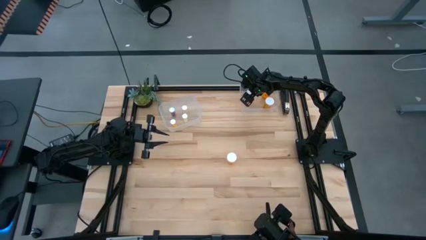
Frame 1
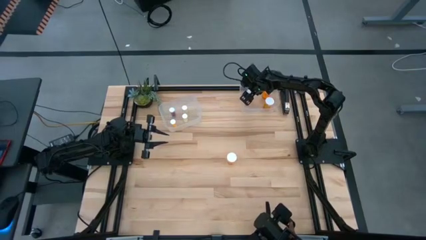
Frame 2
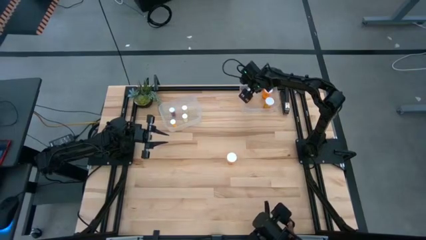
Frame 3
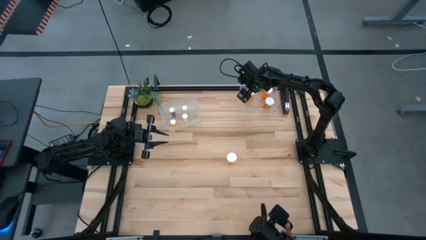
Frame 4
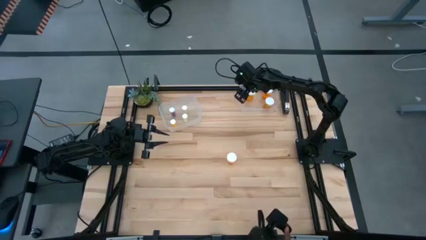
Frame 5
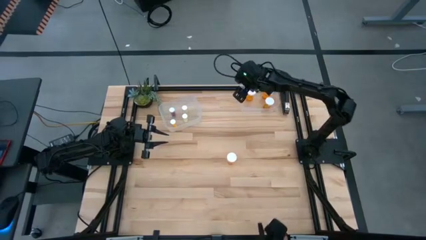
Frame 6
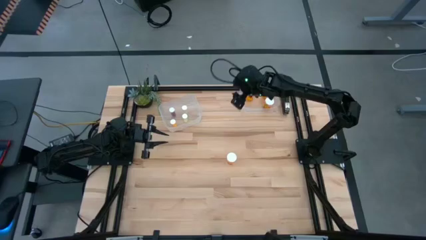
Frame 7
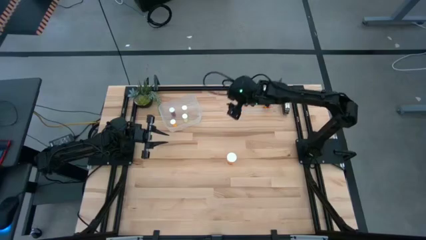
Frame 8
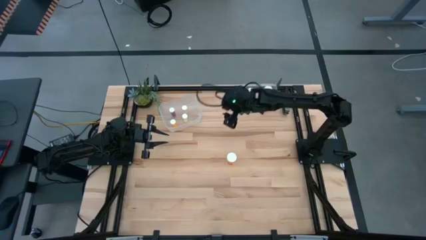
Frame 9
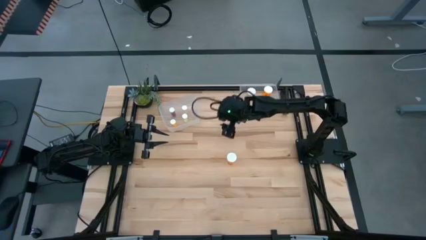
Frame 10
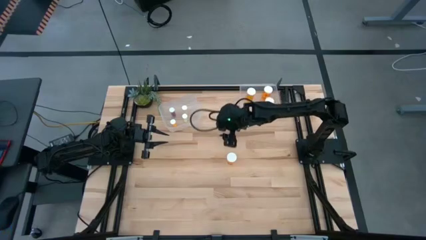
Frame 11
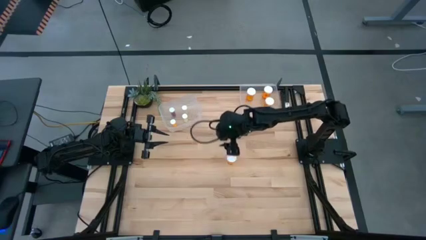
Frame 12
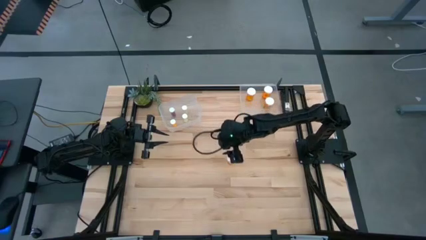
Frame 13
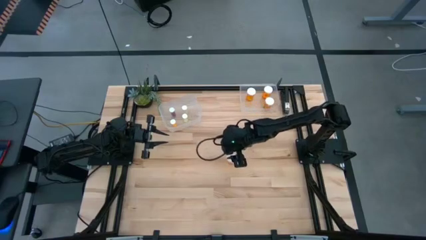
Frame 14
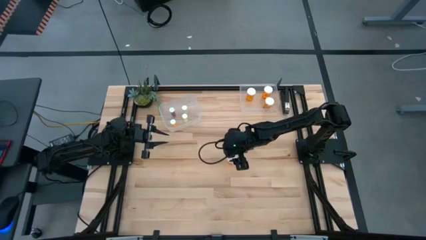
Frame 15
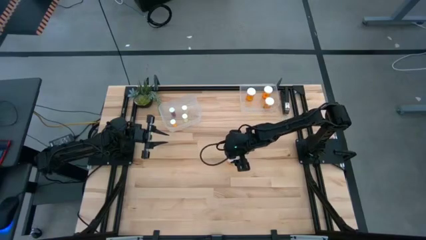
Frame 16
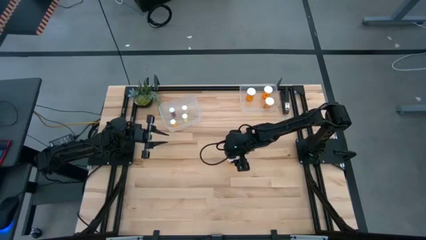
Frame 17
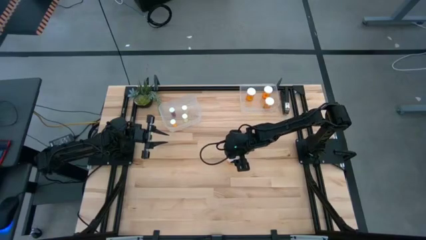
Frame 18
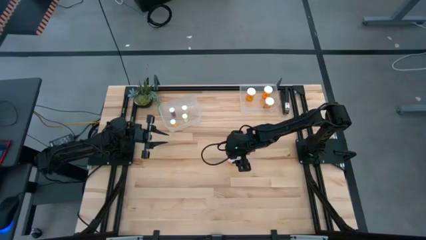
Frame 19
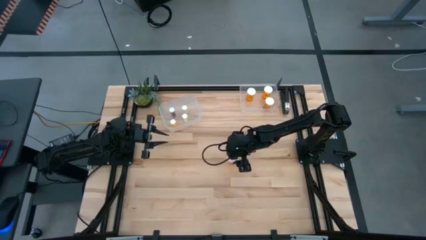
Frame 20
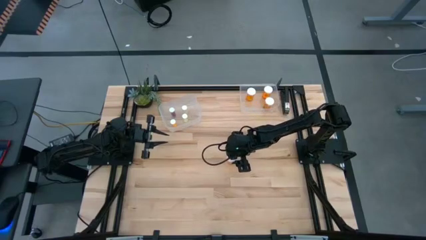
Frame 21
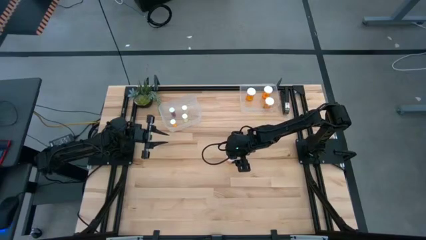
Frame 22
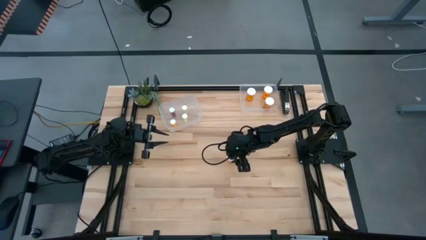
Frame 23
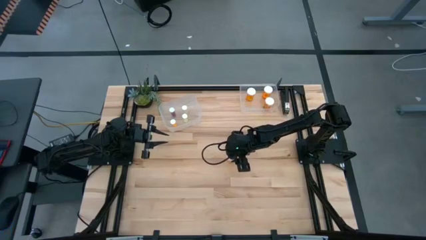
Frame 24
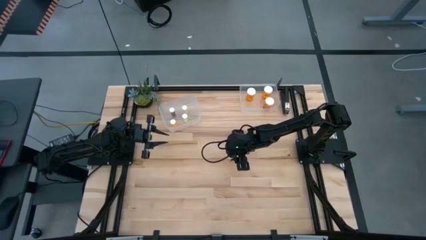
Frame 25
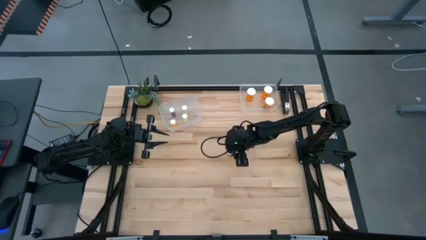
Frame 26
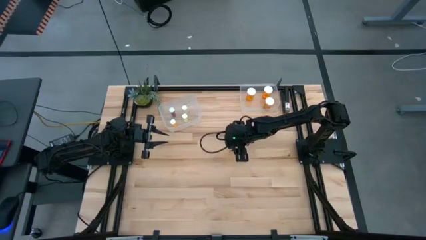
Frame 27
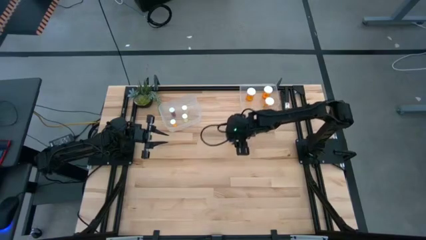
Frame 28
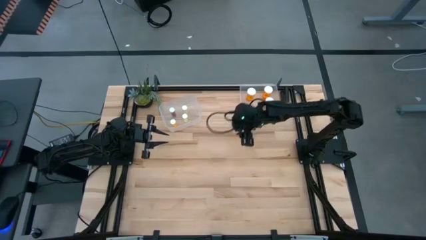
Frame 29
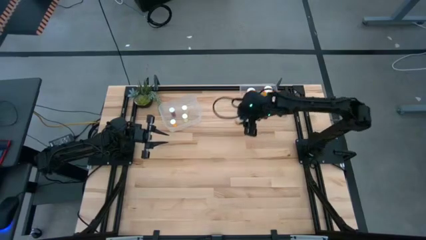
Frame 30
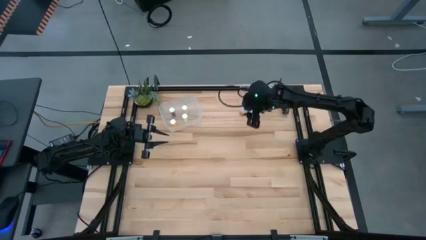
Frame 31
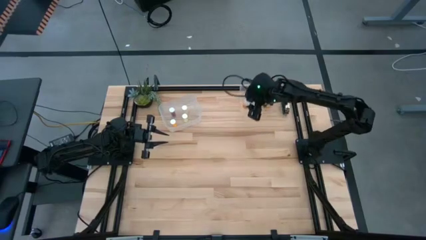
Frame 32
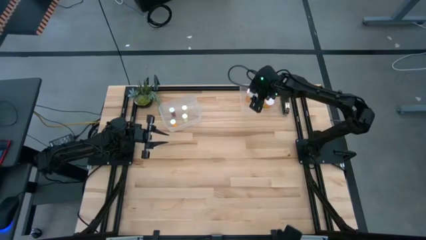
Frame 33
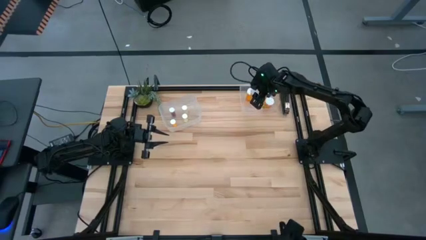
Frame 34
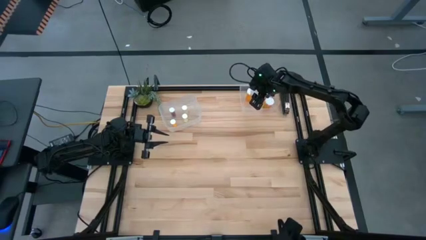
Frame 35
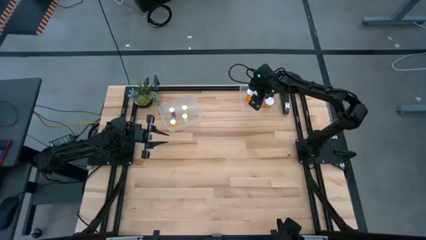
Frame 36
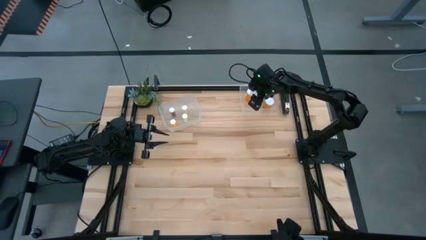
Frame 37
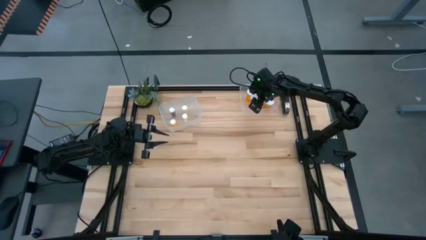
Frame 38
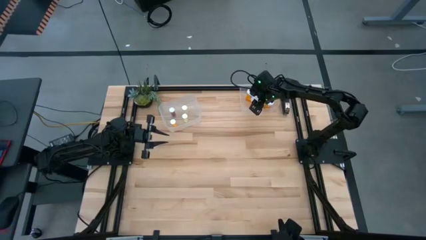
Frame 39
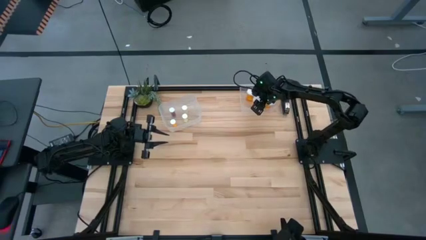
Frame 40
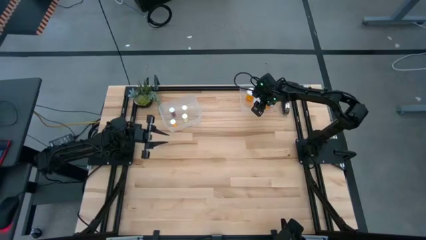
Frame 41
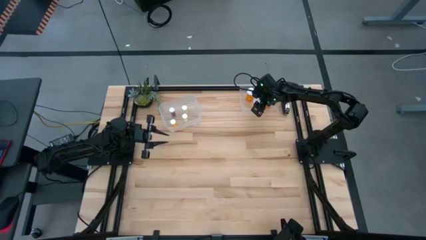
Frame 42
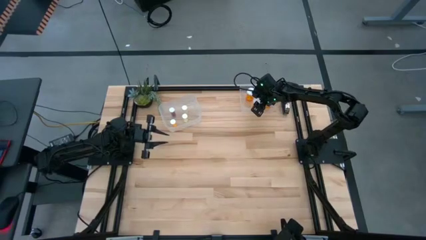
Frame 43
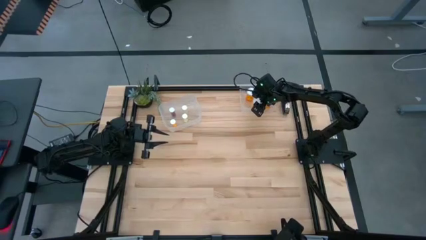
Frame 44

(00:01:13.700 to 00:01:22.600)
Task: Pick and place medicine bottles into bin by pill shape (circle, oval)
Put the orange large pill bottle into the right transparent bin

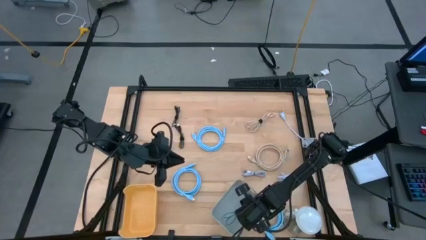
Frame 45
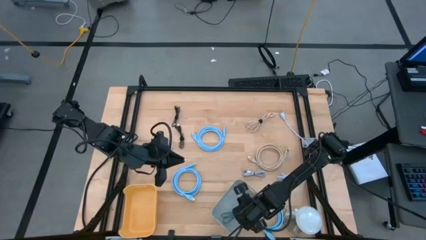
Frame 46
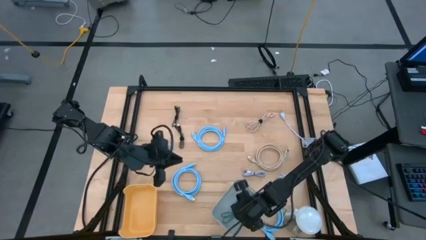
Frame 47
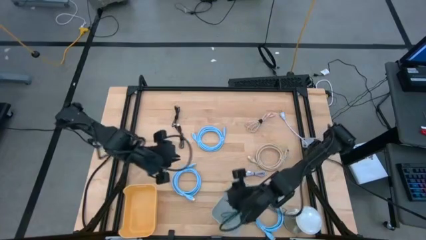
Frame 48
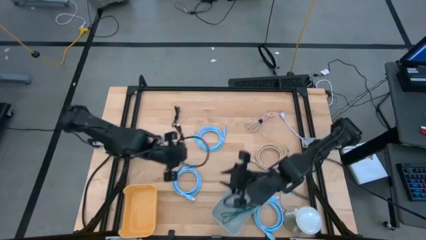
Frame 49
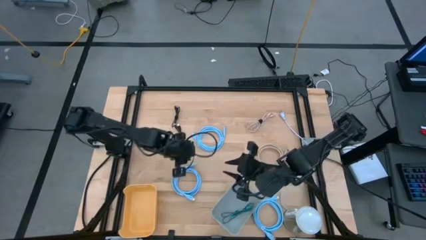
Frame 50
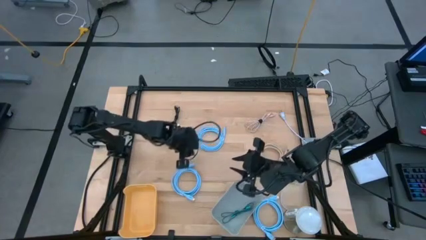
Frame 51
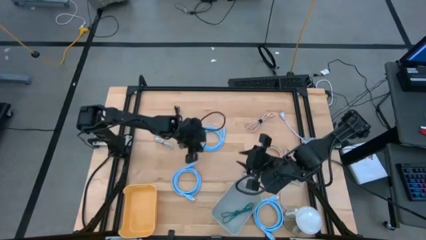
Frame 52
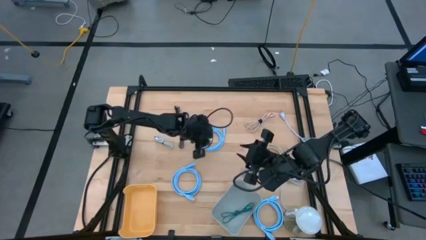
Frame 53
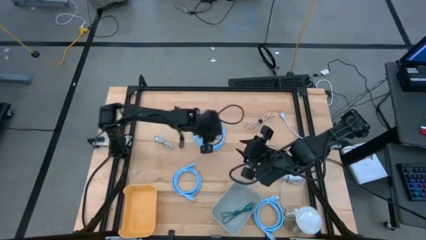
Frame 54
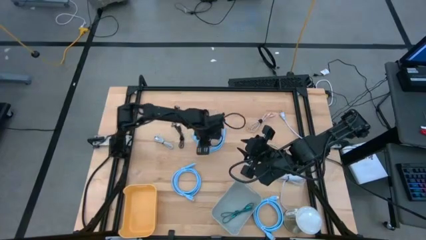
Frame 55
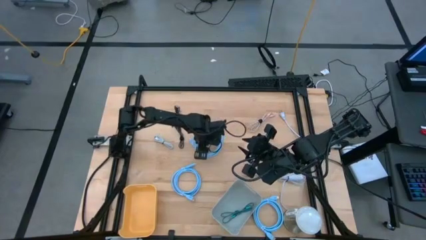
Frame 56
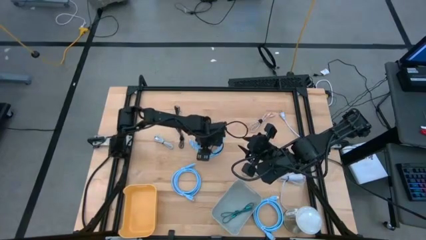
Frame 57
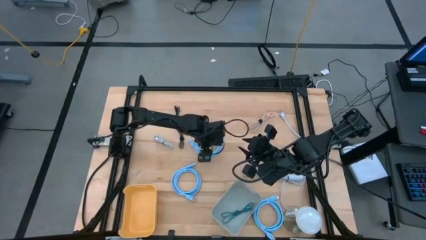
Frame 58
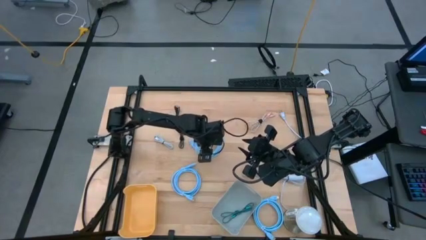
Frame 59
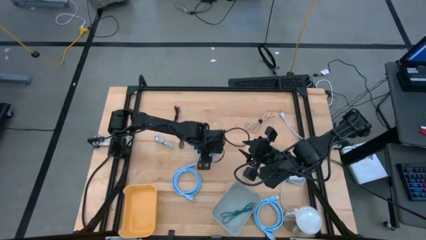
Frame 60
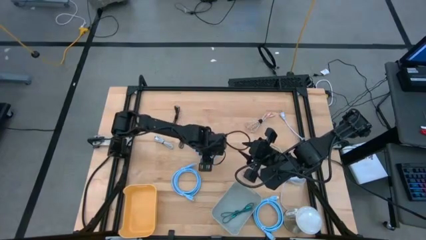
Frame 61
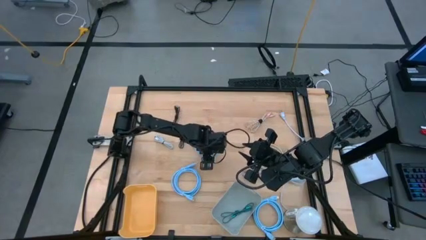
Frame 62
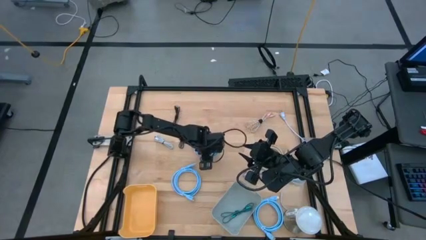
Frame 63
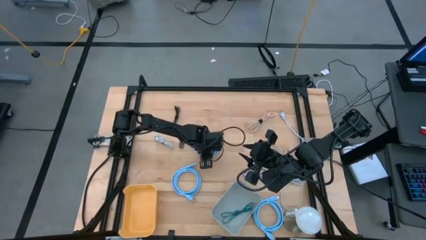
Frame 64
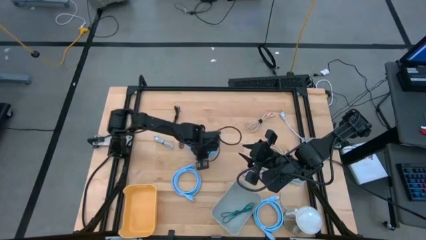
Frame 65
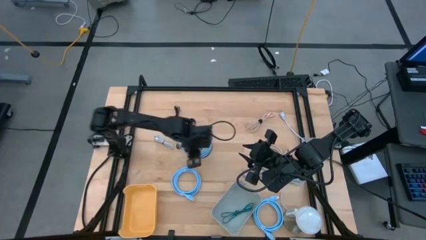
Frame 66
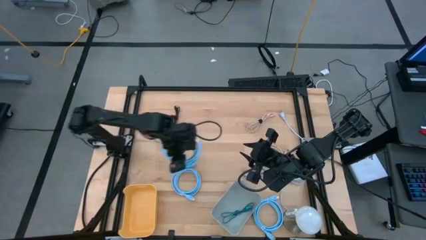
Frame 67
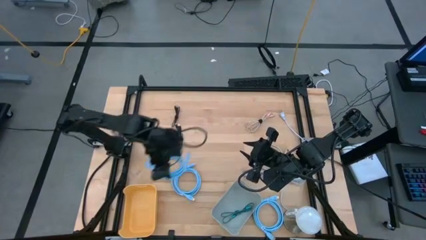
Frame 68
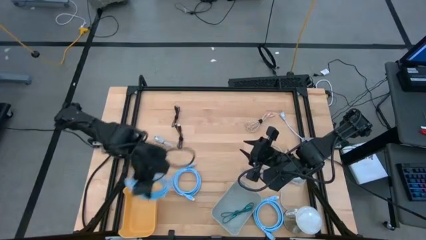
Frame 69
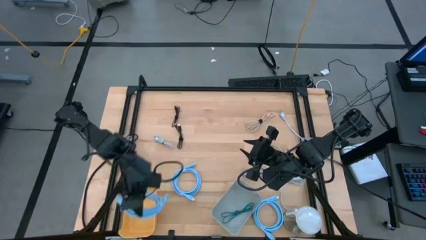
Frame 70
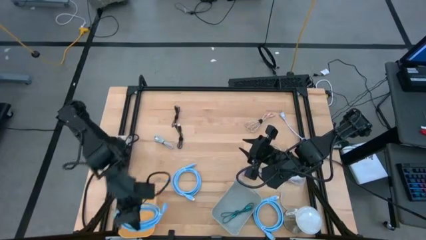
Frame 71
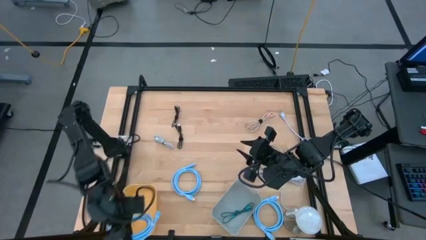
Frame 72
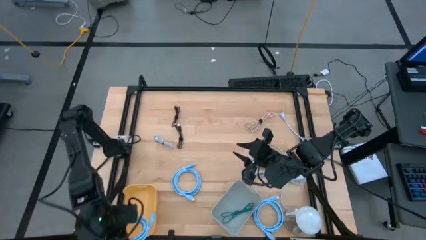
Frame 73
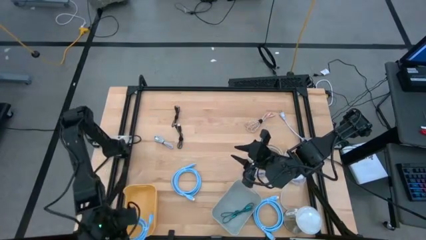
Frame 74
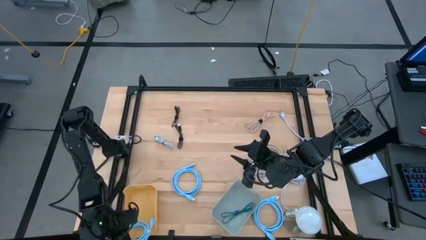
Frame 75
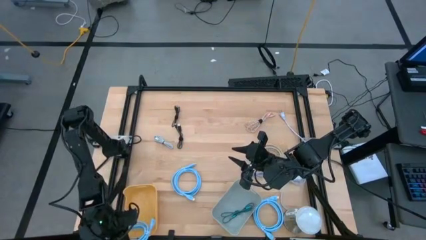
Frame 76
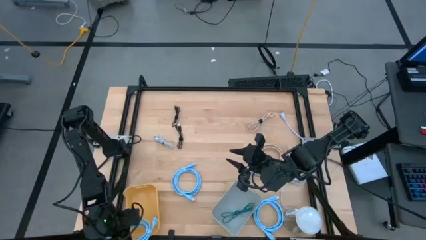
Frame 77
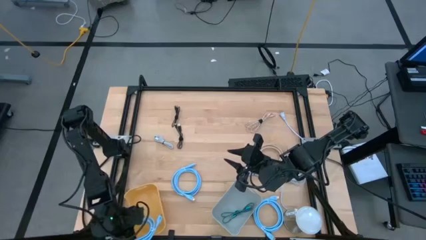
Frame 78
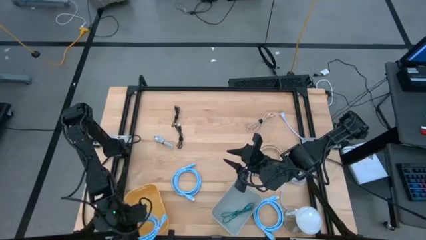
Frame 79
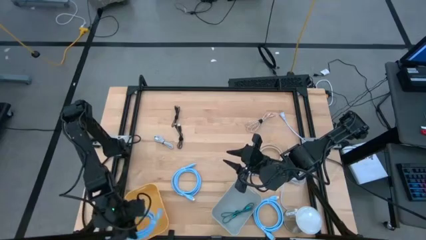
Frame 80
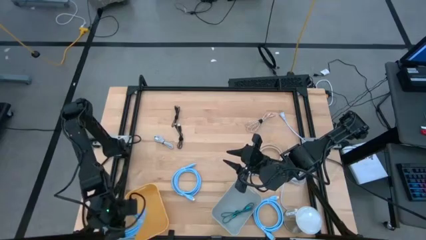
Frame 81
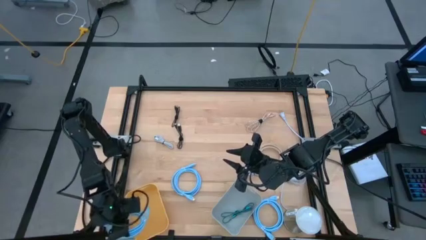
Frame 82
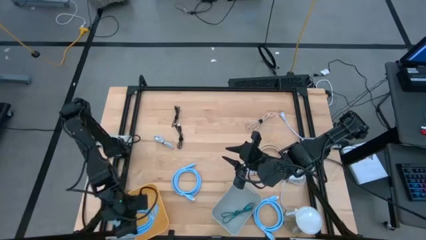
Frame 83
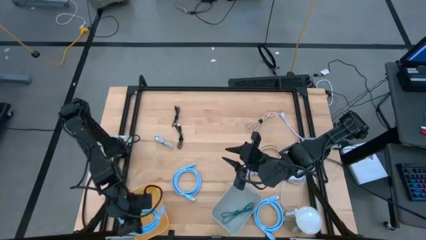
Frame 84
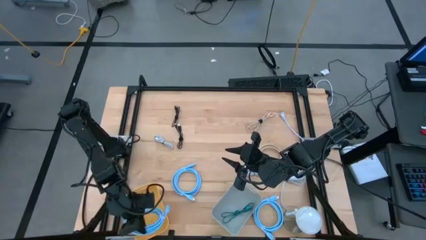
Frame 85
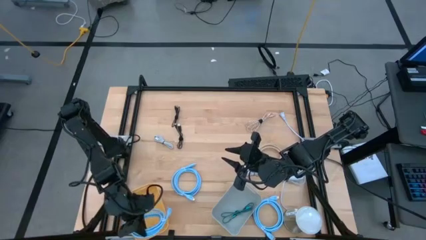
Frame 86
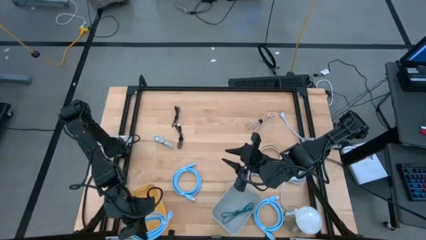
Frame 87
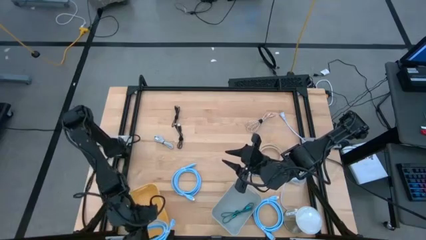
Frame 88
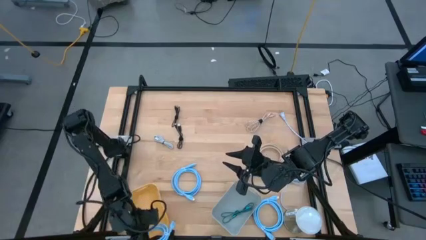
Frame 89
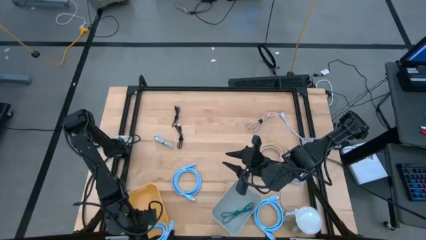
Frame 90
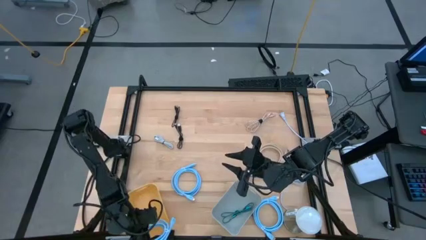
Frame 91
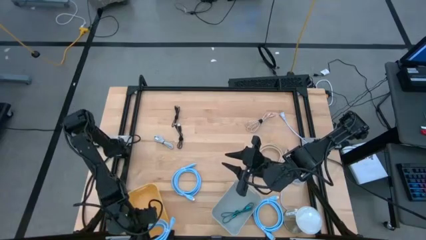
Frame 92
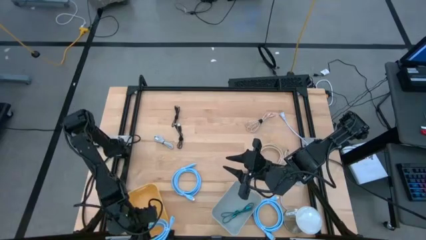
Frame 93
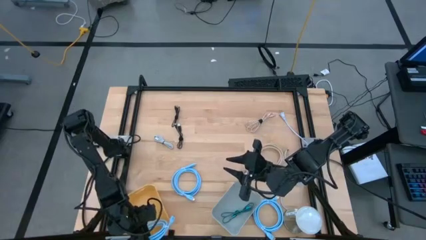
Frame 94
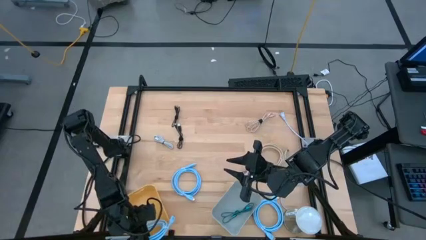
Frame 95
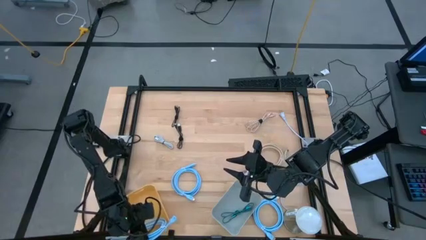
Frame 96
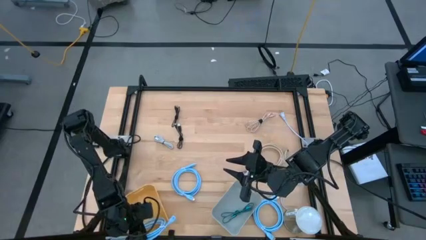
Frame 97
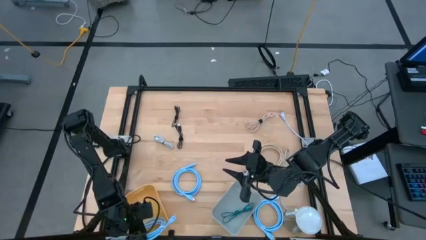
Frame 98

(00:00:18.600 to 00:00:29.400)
Task: Sort cables
Put the top blue HDMI cable into the yellow bin
